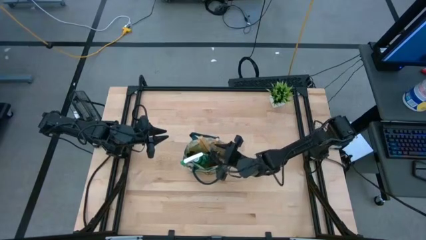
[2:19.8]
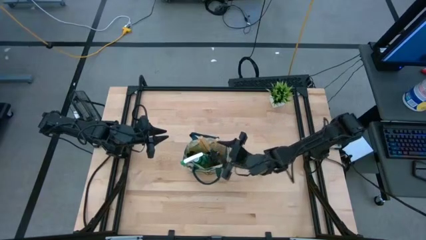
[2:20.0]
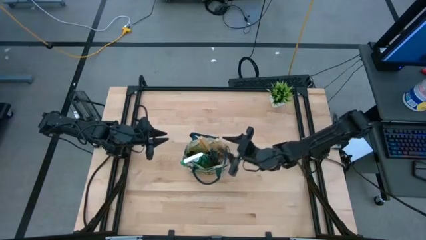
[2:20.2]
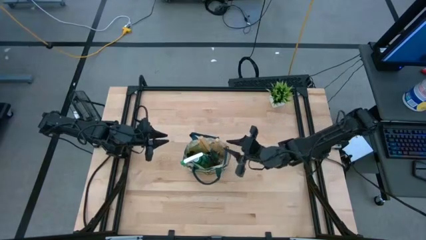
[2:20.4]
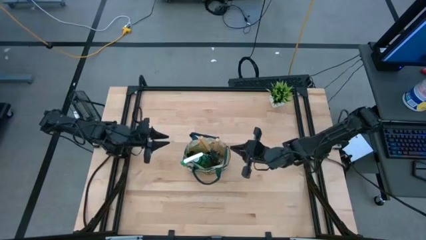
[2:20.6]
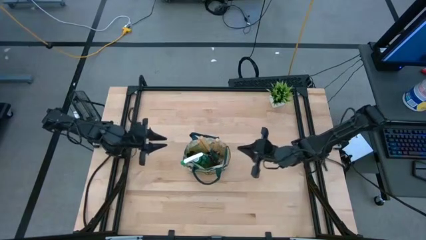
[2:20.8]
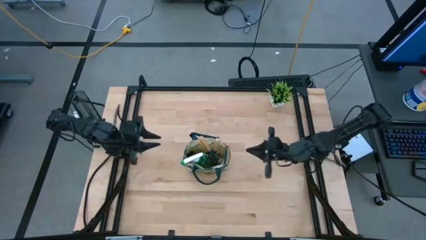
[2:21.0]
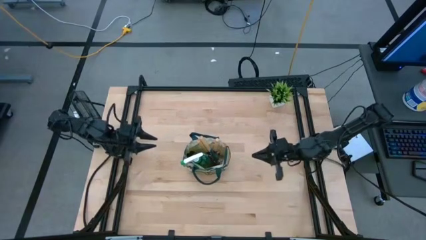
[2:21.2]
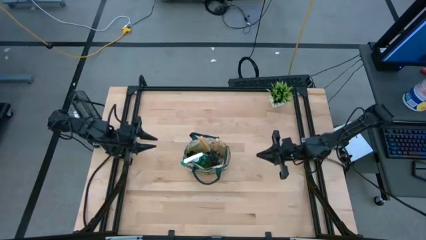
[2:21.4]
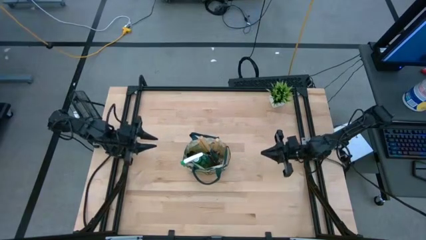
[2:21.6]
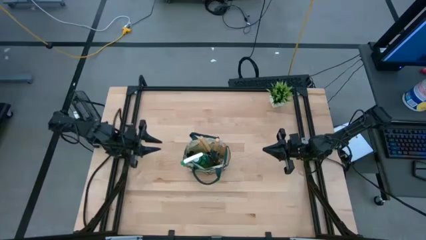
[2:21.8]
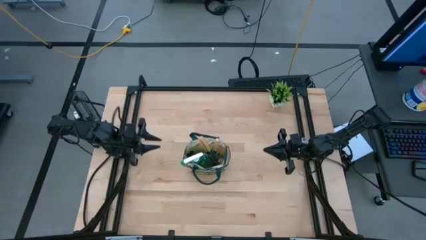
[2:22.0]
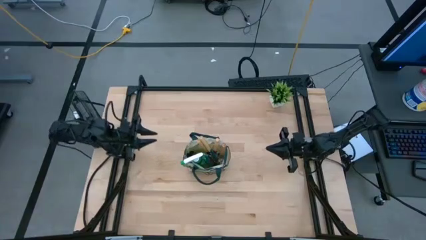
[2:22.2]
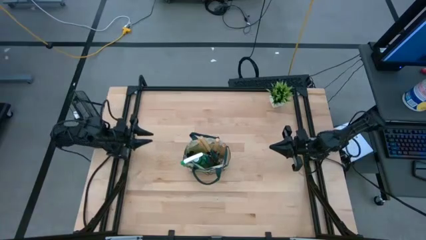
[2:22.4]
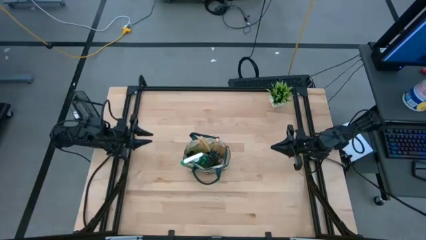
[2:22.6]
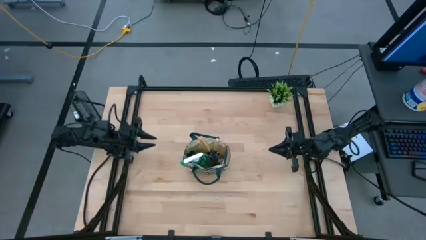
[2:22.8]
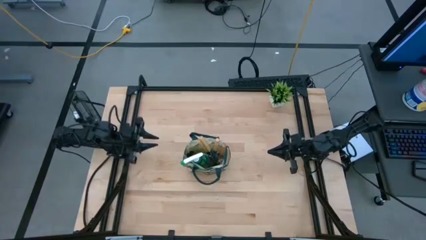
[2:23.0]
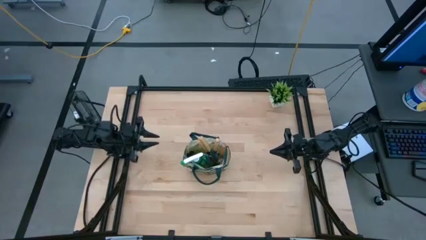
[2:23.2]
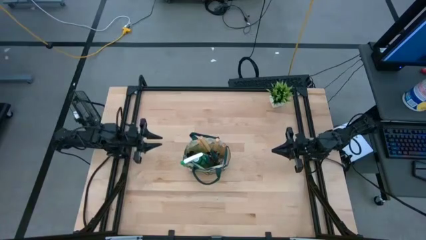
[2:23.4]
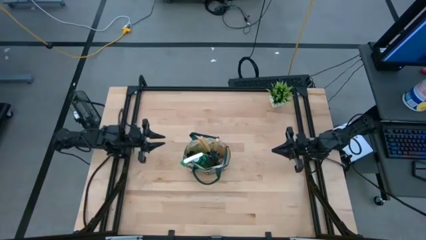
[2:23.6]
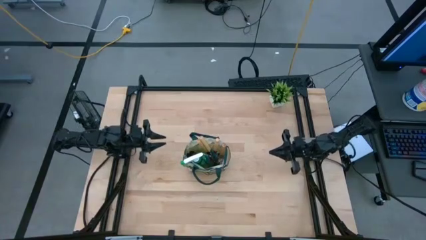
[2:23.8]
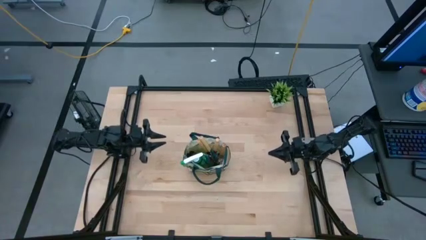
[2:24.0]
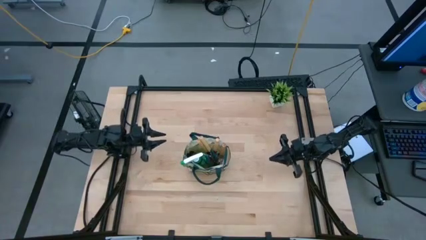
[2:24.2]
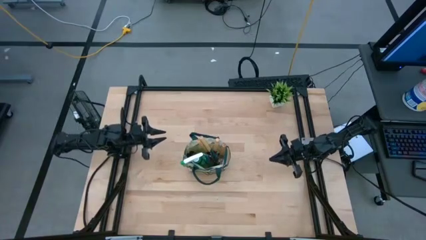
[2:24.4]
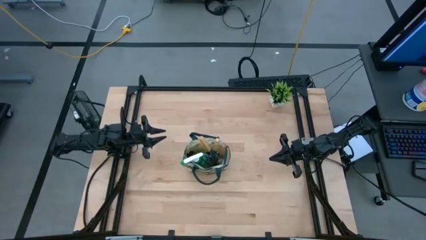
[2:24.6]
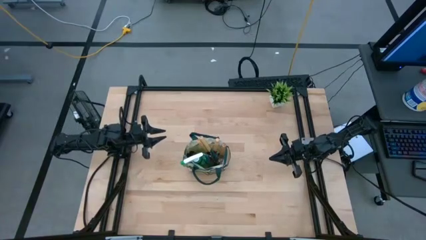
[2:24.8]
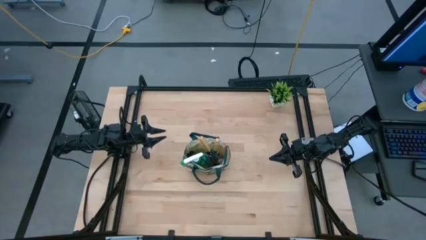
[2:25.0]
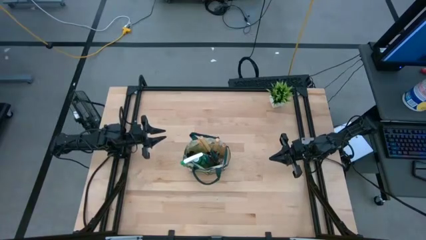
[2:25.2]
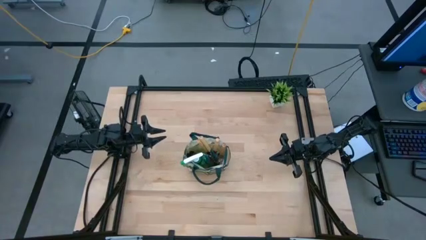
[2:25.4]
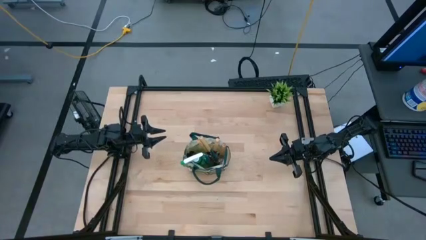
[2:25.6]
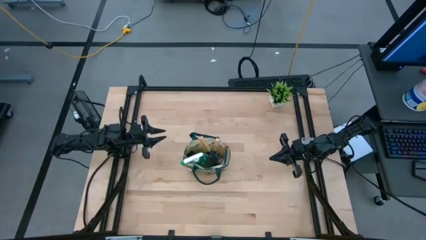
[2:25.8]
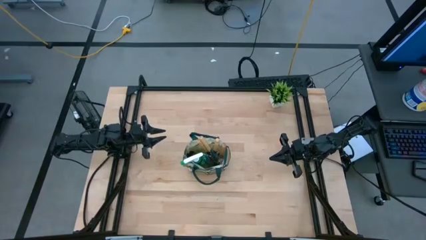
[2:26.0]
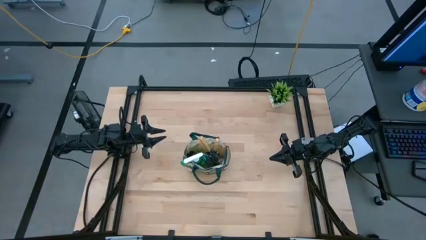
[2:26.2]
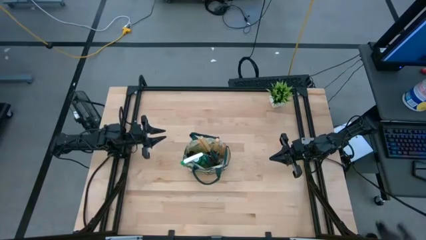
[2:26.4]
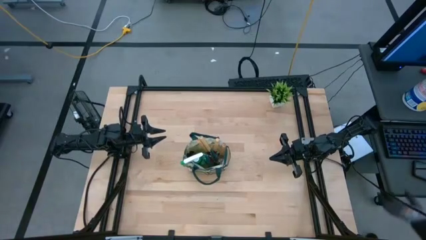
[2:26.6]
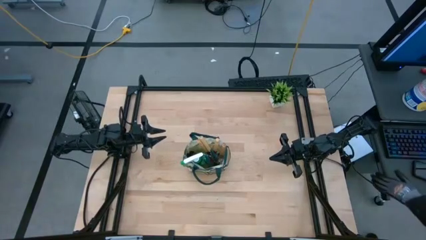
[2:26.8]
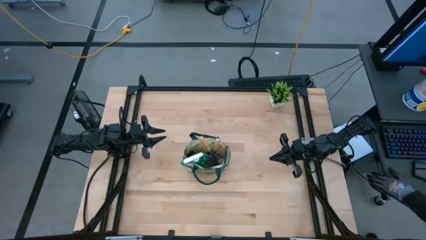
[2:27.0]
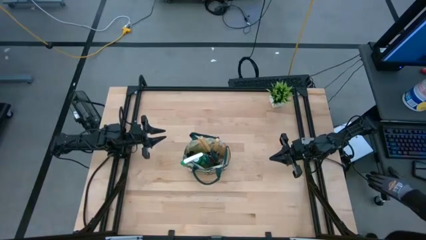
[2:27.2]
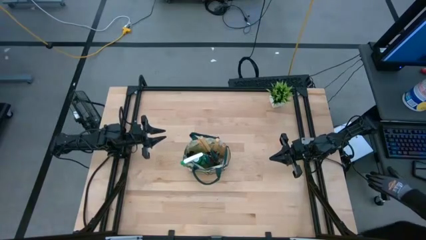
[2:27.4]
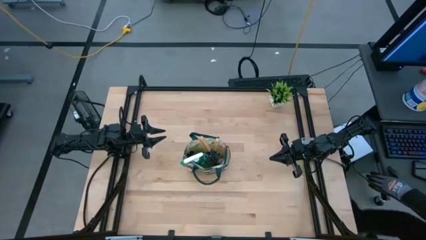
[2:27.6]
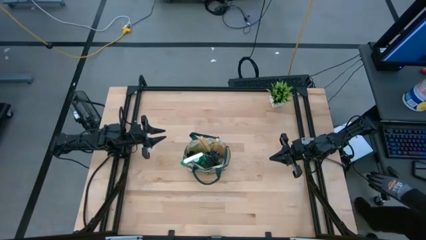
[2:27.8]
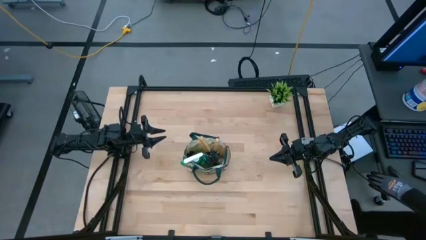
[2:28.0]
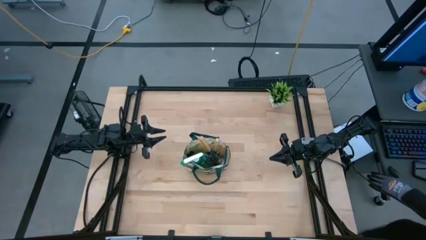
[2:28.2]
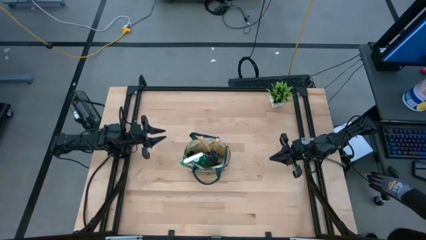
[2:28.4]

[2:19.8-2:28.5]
Task: Pick & Place Garden tools in Gardening bag
Return to Home Position

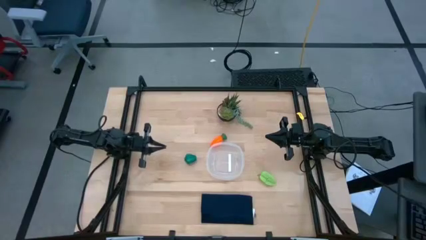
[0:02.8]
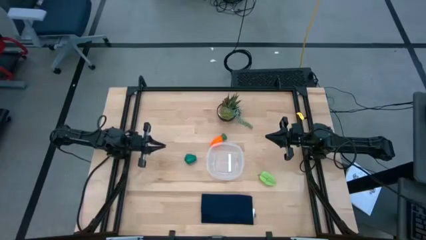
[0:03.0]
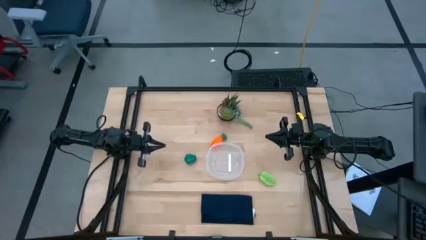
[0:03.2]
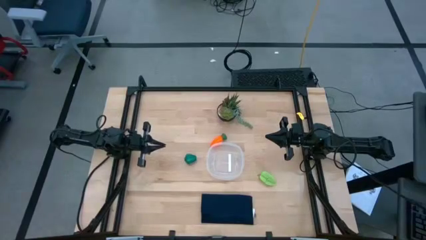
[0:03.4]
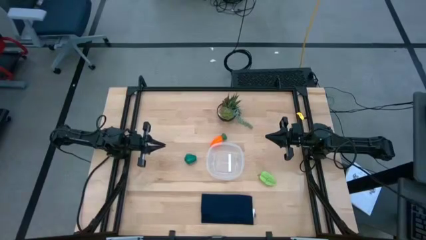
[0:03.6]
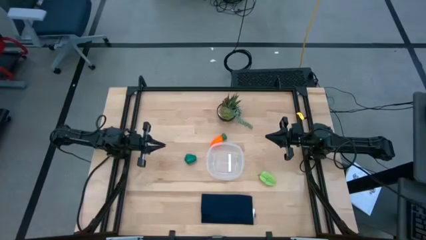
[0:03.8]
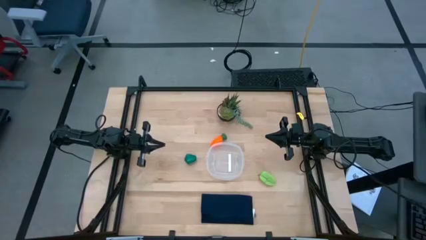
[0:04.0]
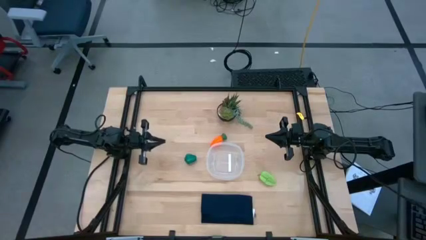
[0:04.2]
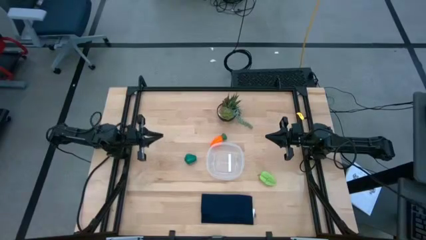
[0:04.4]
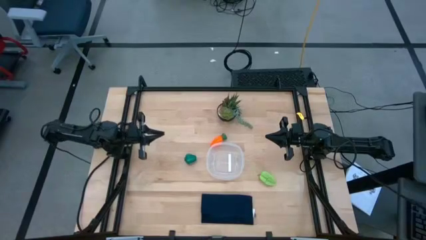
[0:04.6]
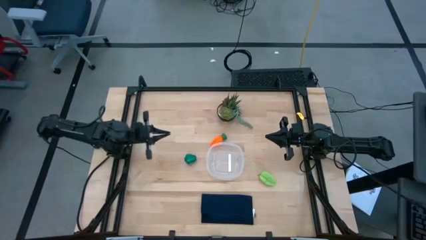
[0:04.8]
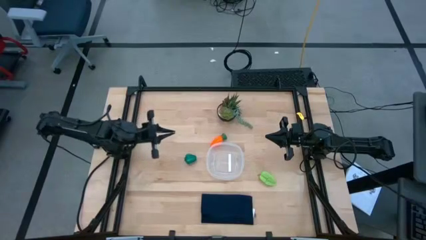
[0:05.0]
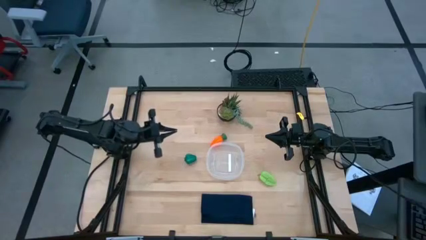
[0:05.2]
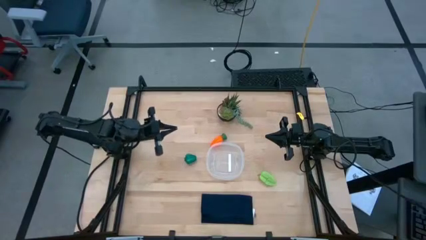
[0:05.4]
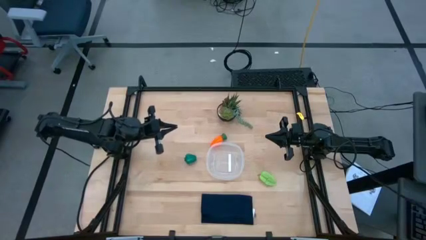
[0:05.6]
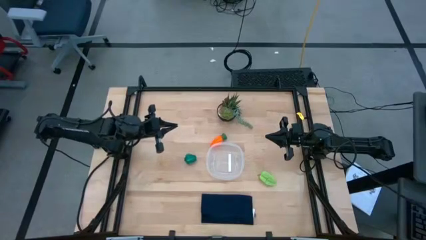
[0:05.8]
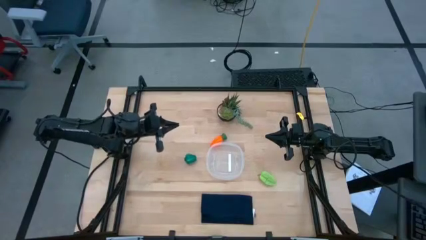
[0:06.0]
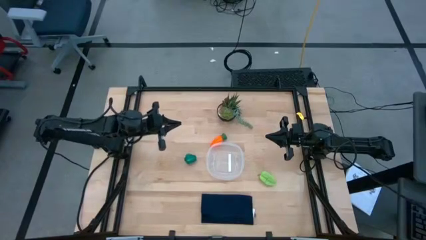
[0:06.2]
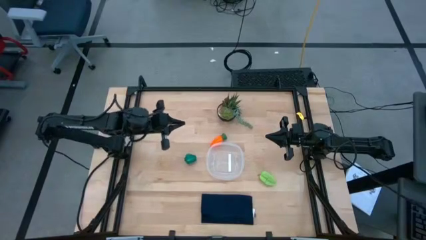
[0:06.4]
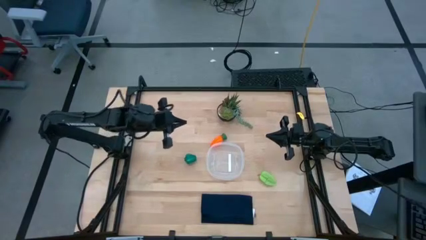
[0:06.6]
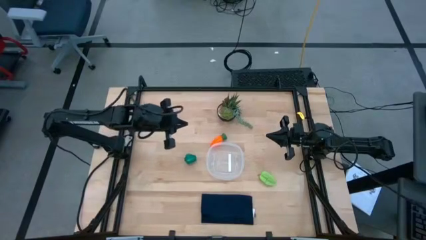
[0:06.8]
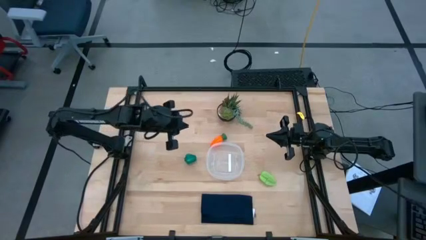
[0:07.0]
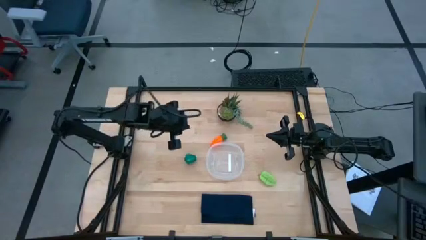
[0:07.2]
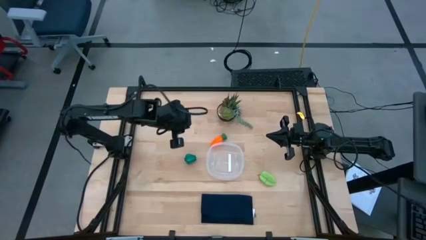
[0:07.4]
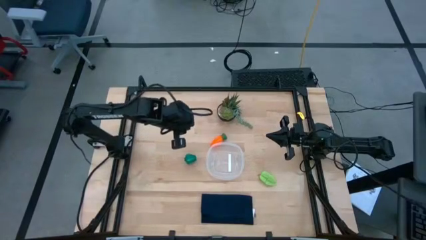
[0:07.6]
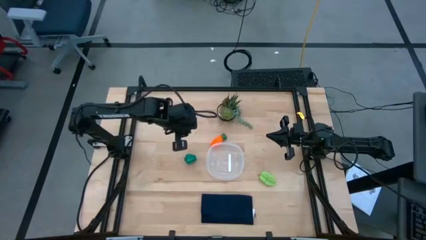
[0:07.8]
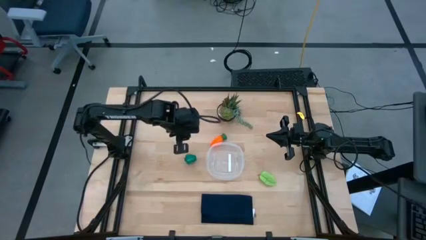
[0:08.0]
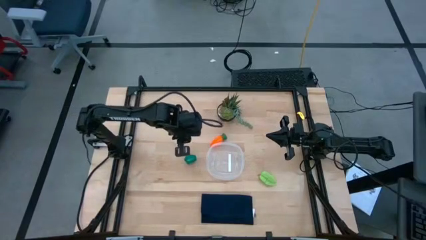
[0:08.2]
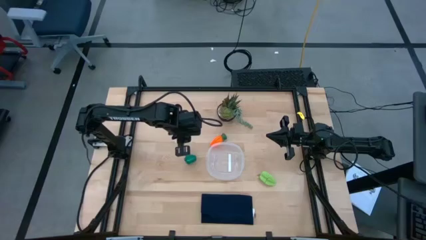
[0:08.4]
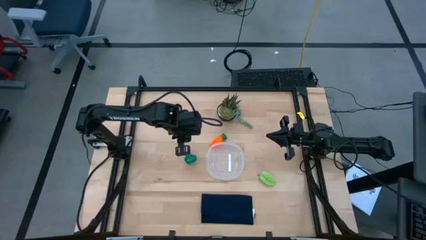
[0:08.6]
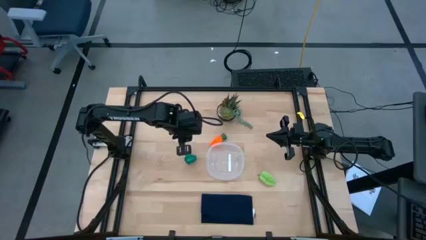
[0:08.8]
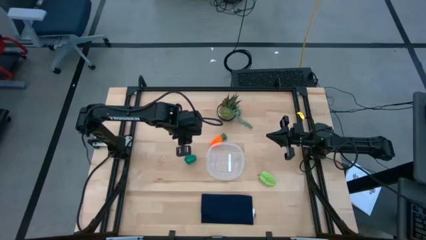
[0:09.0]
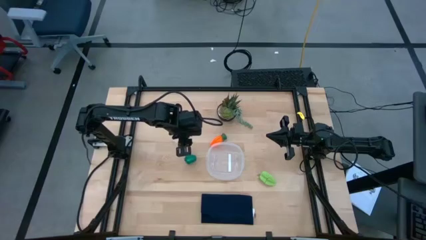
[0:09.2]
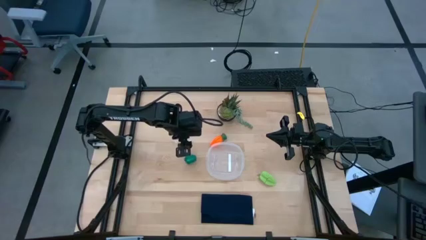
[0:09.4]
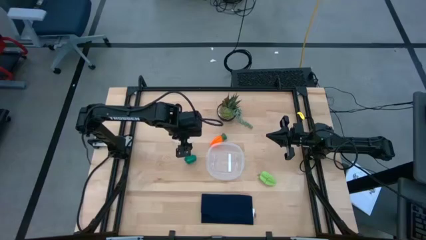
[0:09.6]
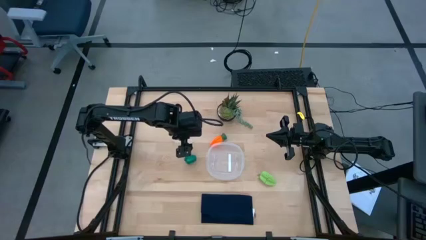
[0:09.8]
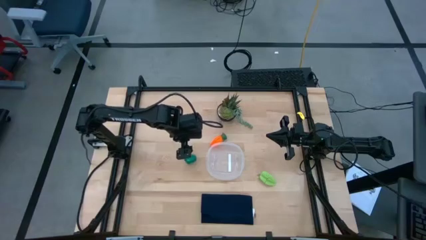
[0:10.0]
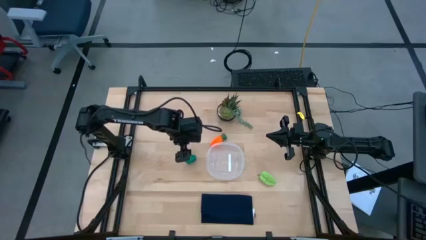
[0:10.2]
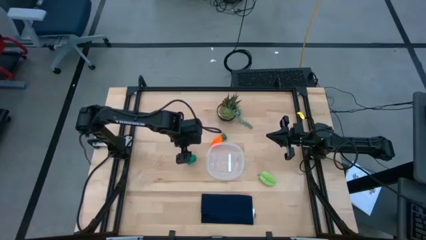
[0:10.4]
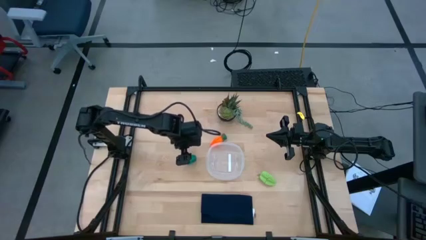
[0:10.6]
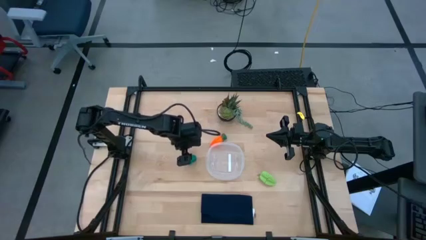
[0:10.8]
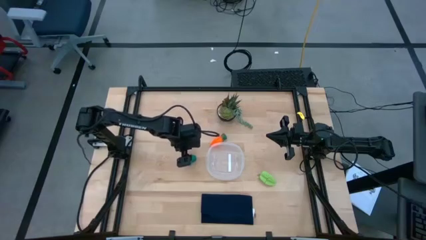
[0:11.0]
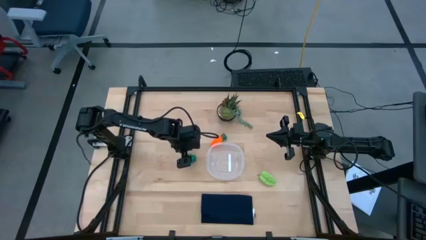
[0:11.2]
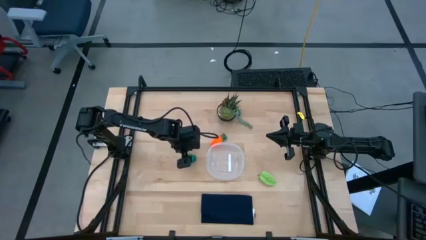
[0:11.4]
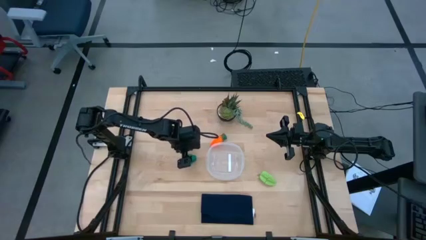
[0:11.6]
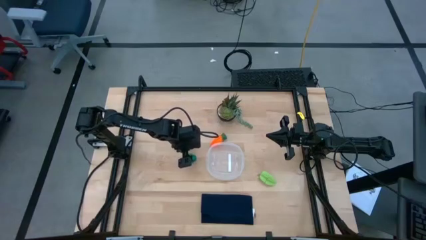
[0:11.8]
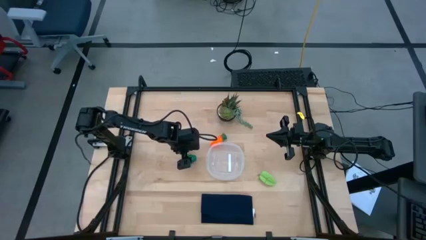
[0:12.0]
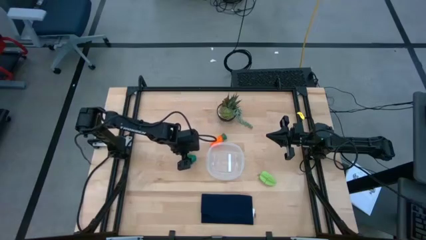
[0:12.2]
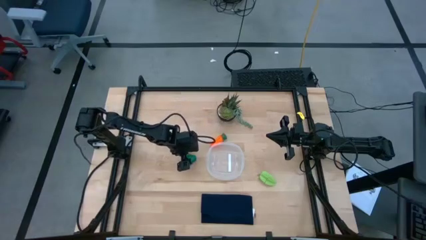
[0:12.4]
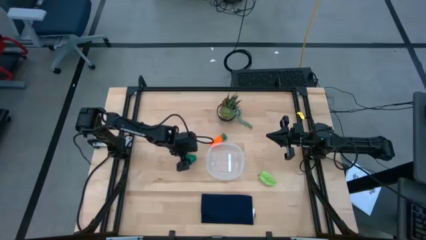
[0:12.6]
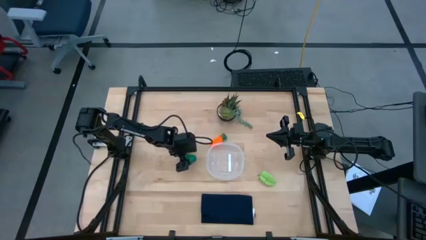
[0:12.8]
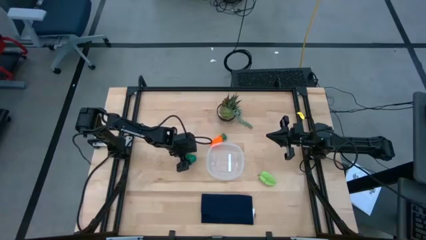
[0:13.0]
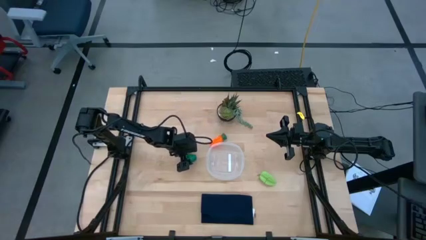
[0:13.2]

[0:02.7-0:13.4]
Task: Pick and placing Produce into tupperware
Put the bell pepper into the transparent bin
